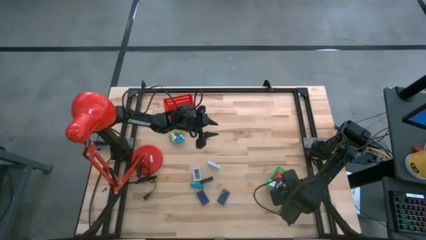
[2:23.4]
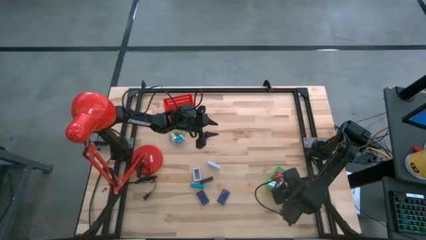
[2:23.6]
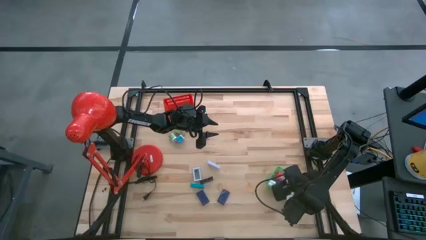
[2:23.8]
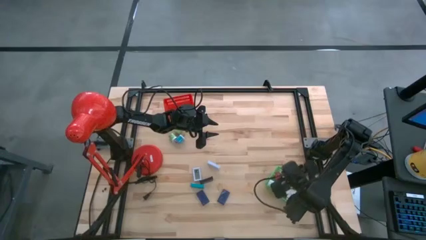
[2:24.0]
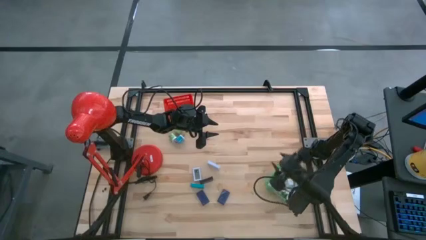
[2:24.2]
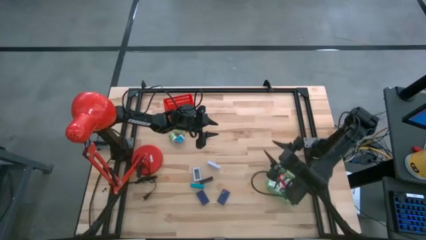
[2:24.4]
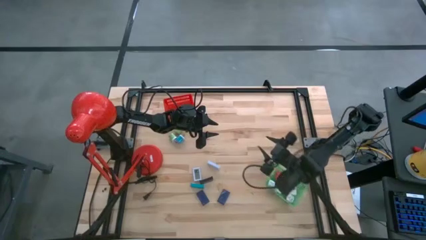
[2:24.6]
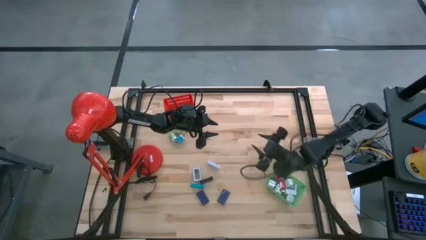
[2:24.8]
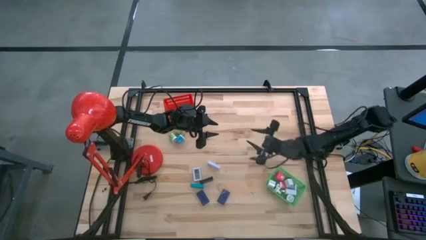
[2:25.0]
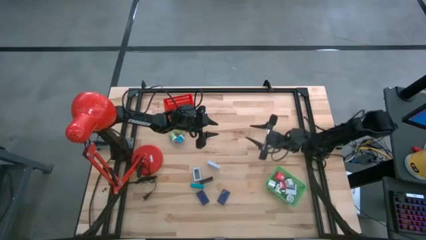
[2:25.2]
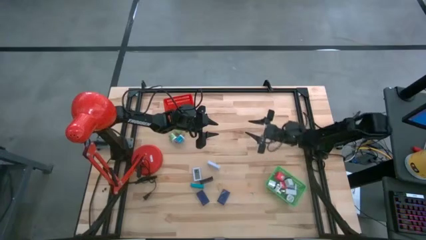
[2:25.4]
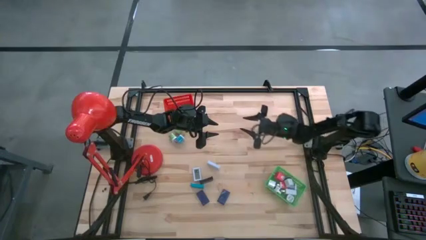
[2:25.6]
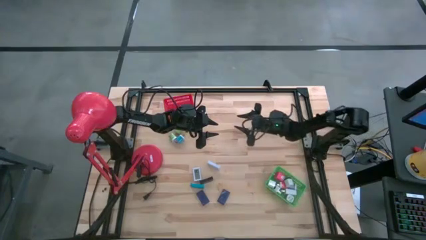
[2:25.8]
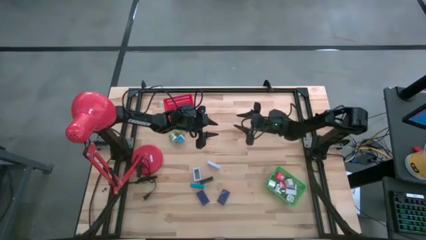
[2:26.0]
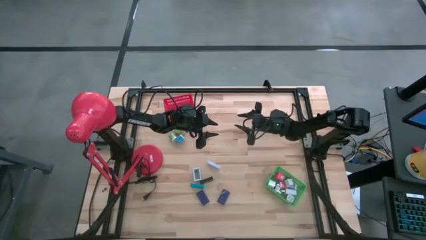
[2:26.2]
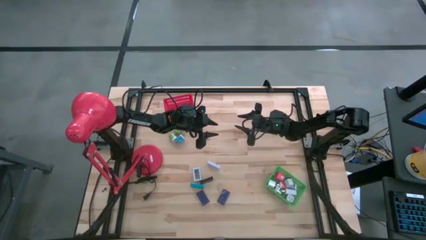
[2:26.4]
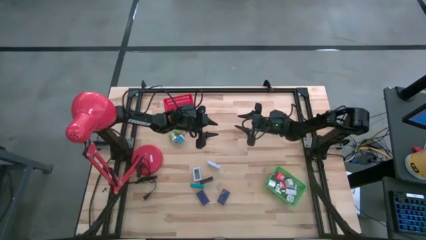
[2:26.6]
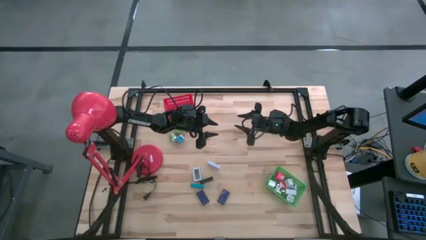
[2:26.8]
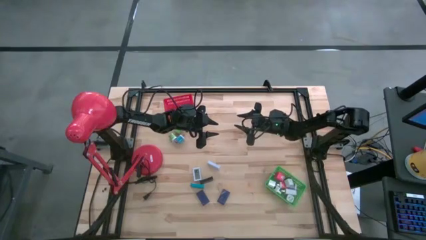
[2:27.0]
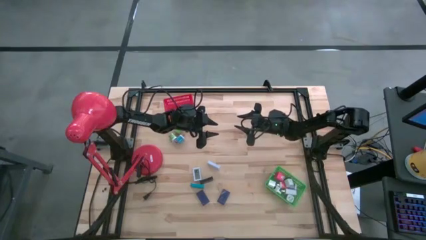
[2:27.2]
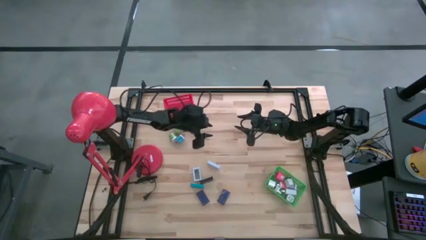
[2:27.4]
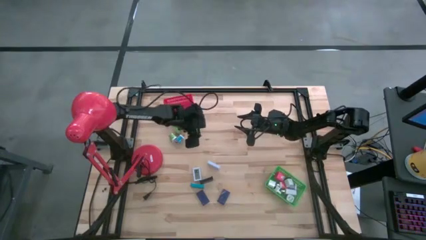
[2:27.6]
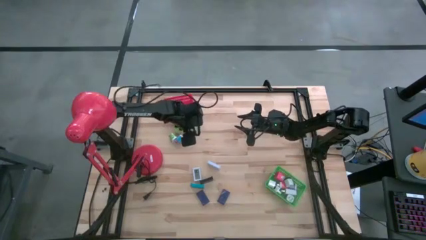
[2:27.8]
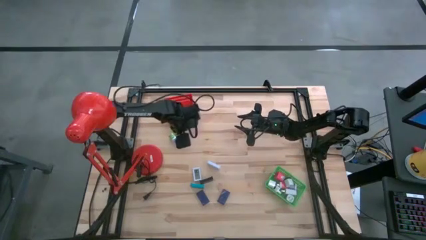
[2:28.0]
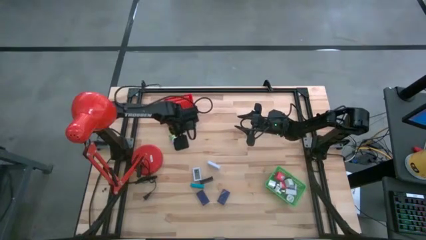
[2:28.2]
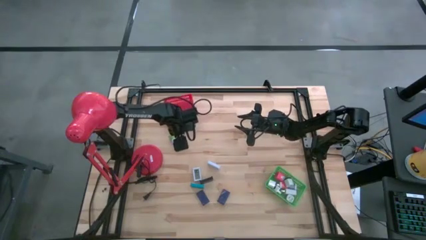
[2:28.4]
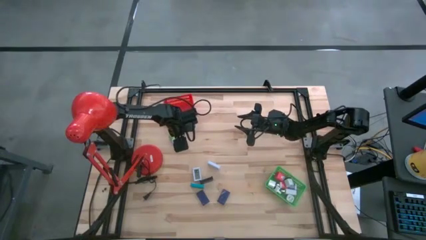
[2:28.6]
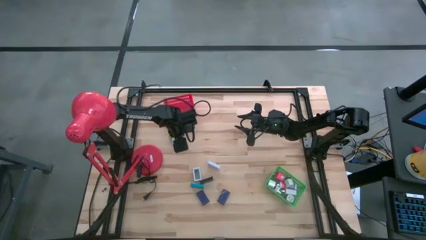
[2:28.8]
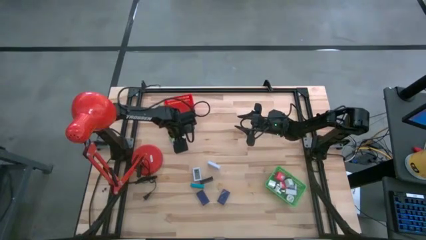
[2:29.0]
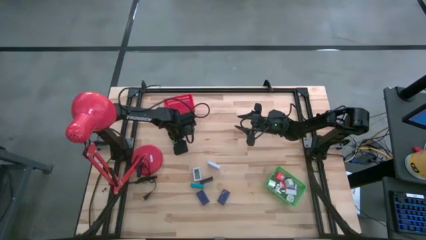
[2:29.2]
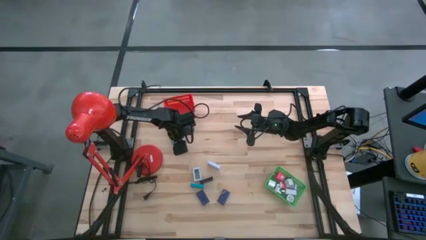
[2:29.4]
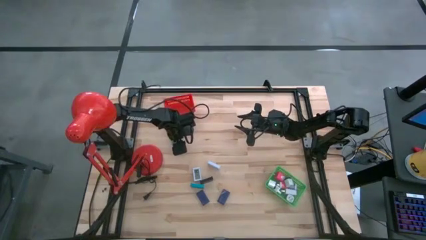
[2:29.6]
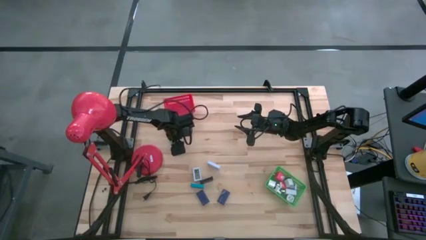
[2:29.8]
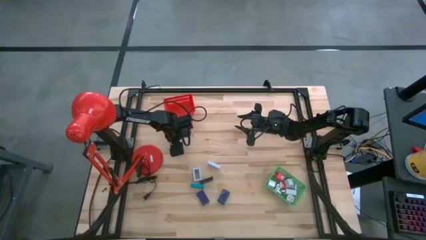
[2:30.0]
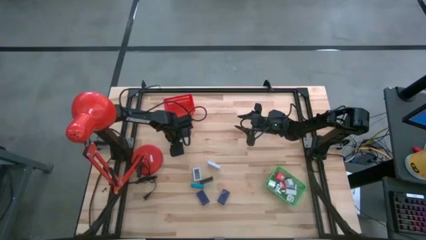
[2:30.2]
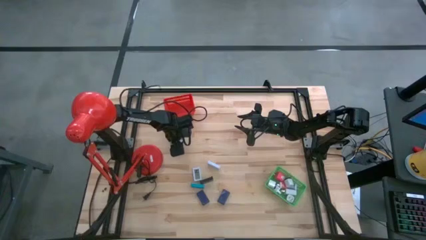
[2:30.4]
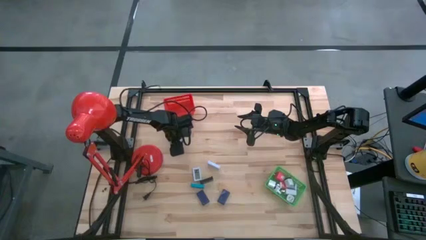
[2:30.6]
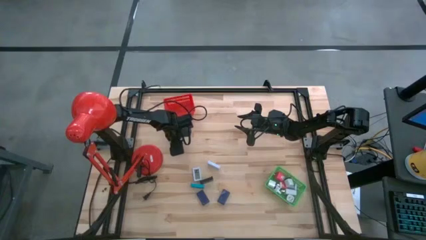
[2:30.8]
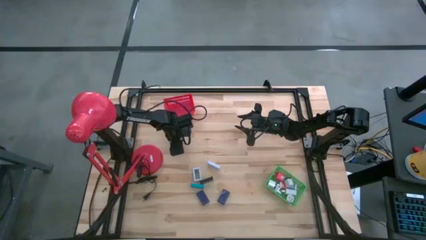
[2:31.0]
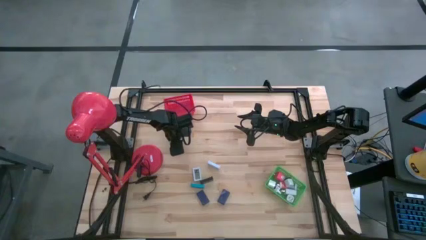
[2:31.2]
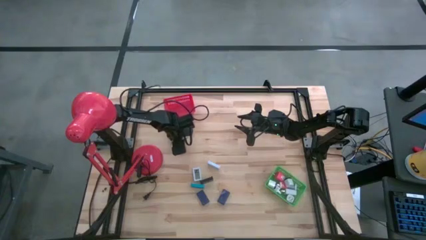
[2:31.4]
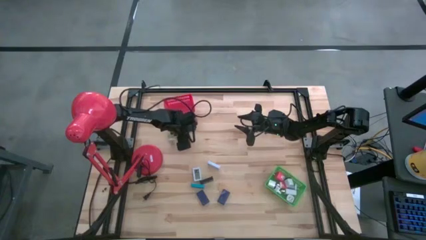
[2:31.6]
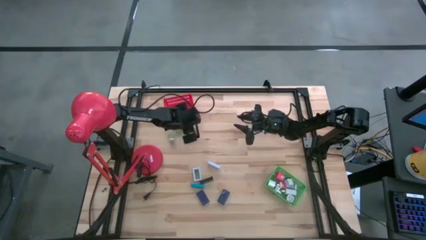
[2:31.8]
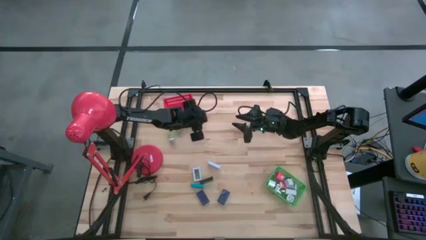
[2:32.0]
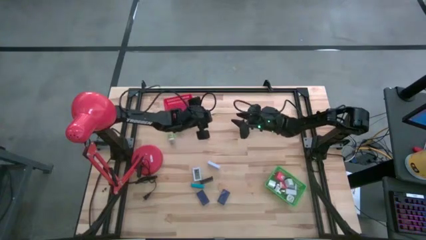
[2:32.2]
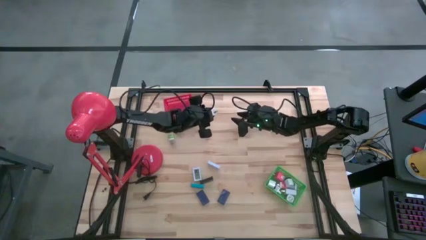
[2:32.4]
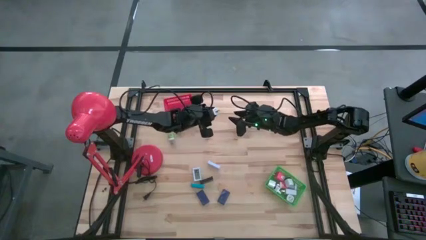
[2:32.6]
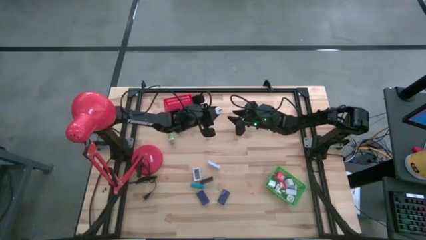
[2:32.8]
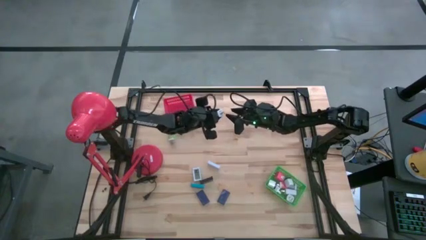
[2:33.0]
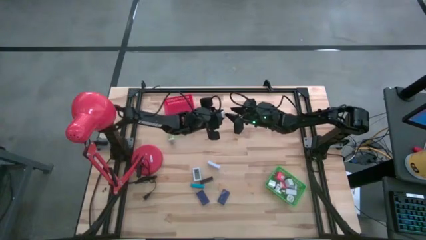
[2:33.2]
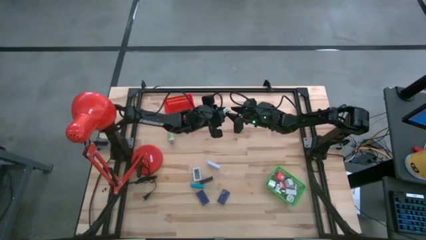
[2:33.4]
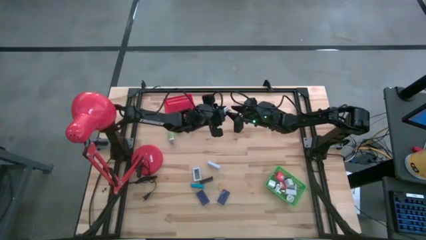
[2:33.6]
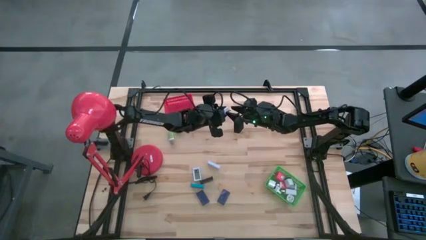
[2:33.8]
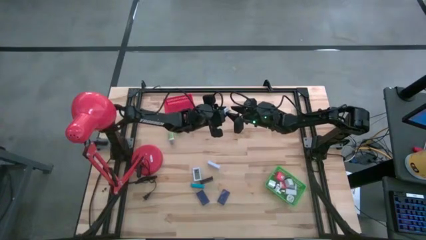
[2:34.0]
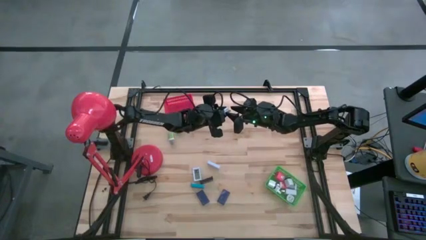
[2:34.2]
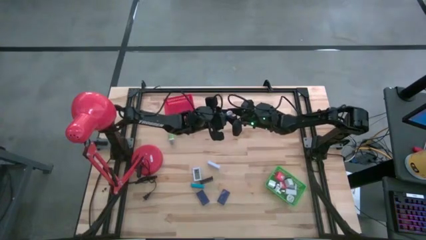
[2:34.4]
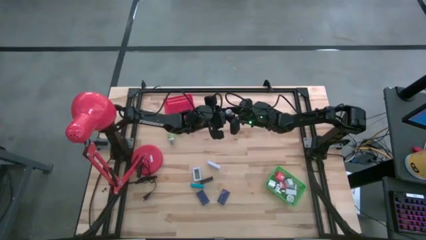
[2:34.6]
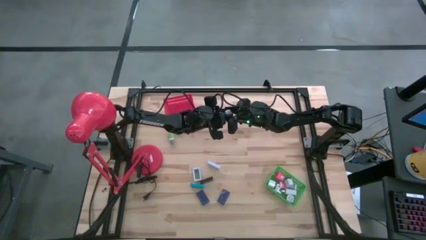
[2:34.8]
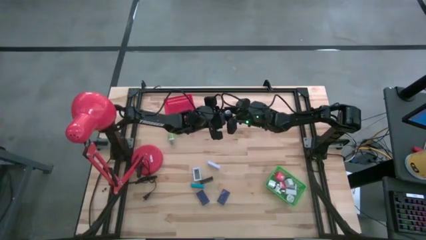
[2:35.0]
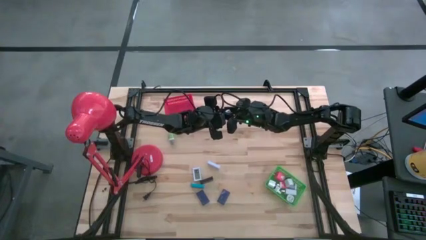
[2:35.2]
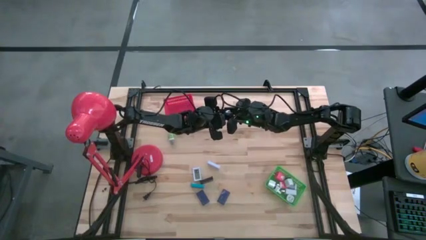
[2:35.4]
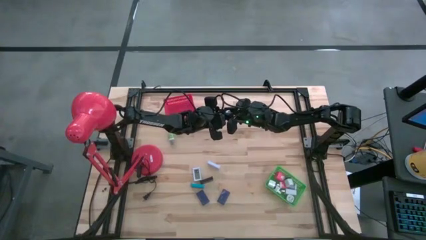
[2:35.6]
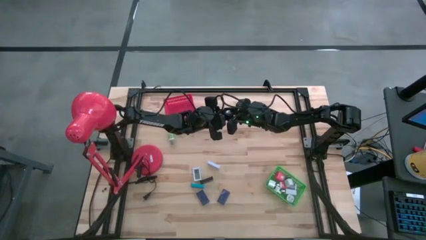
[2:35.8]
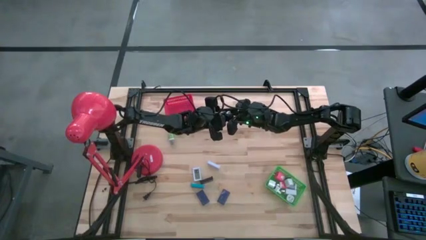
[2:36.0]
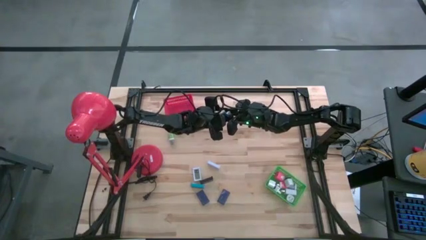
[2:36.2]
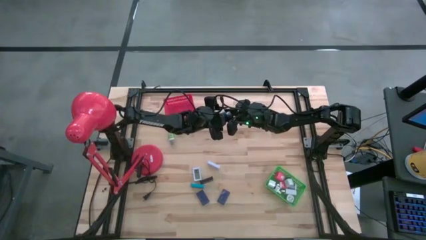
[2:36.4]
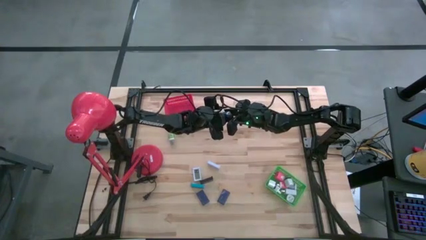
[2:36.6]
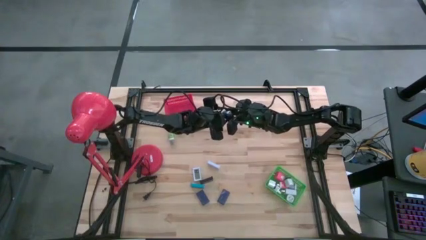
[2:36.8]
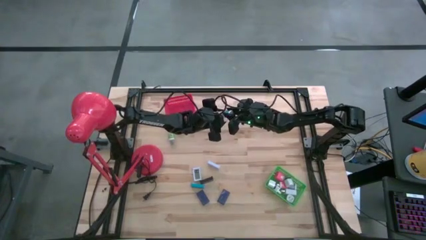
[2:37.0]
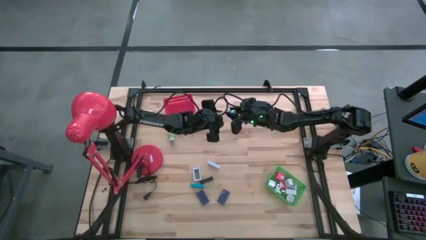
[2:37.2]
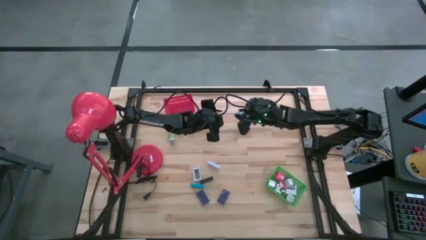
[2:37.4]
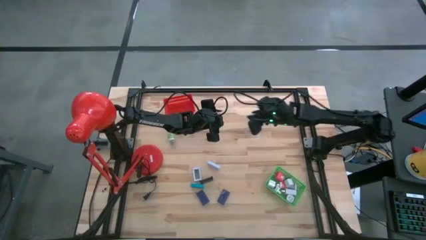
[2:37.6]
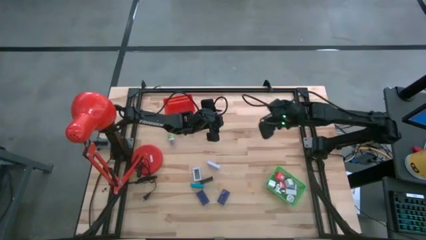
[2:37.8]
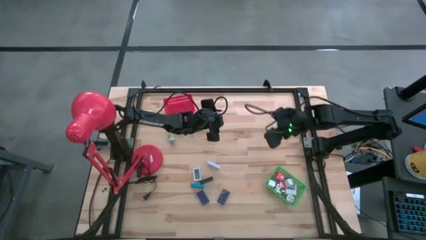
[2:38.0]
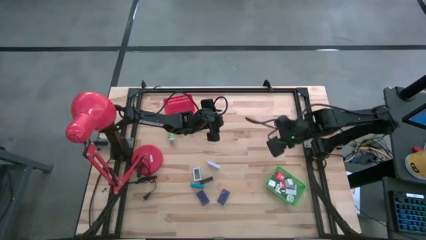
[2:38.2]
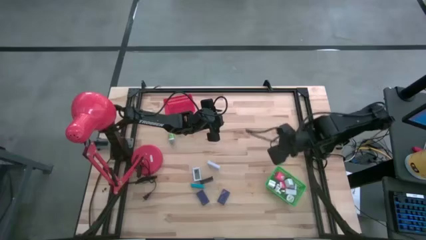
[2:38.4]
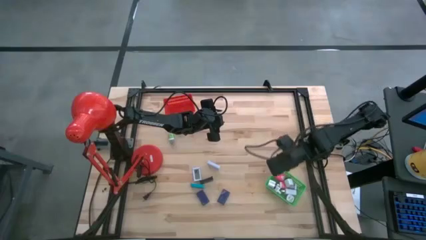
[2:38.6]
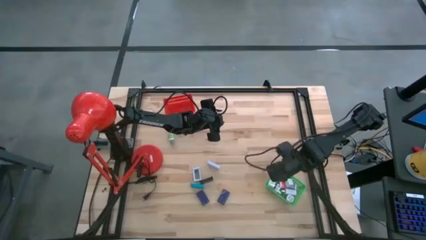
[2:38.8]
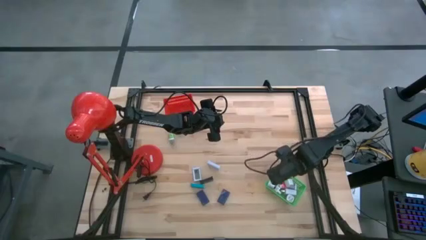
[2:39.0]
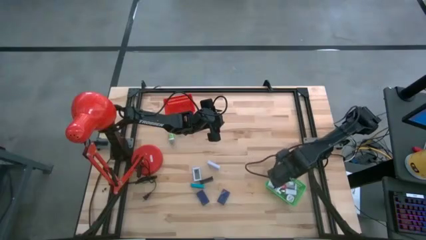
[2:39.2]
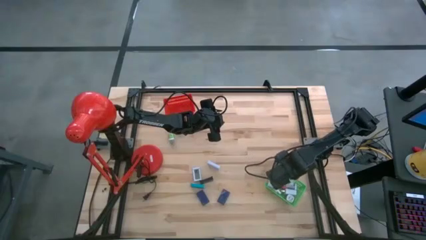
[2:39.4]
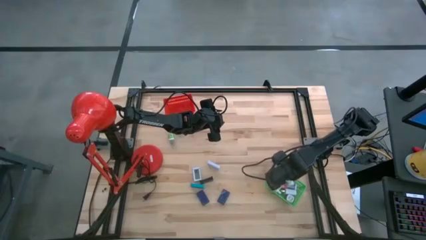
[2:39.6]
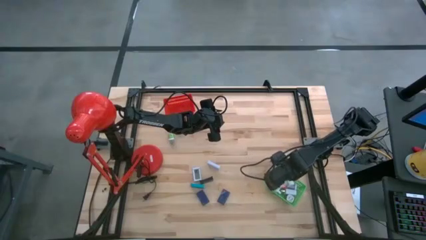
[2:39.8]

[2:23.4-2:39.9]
Task: Pick & Place Office items
Put the blue charger adapter into the green bin
